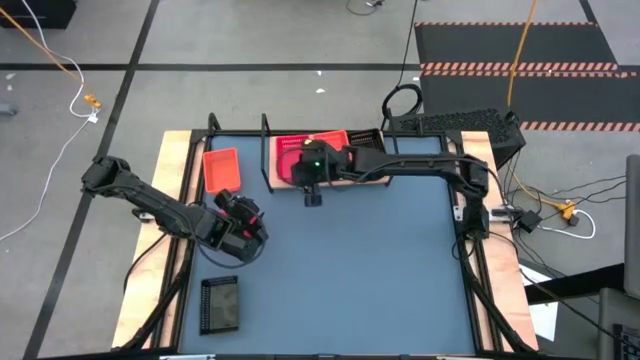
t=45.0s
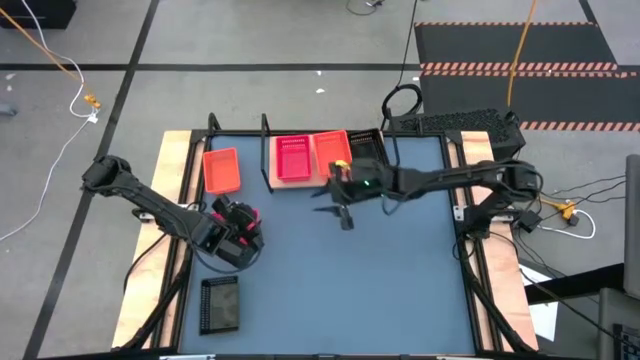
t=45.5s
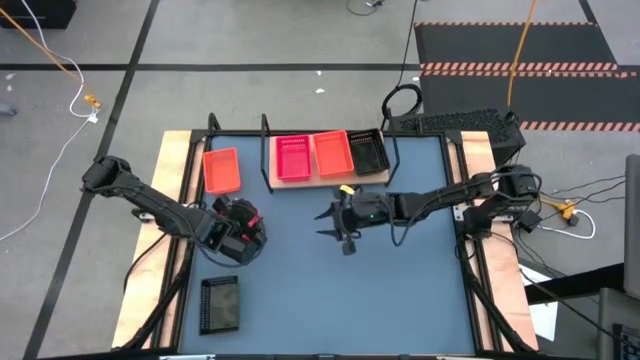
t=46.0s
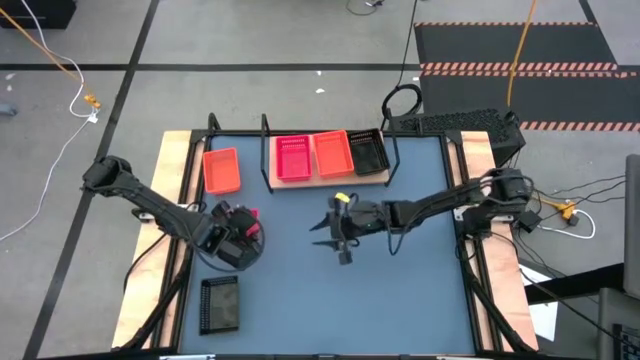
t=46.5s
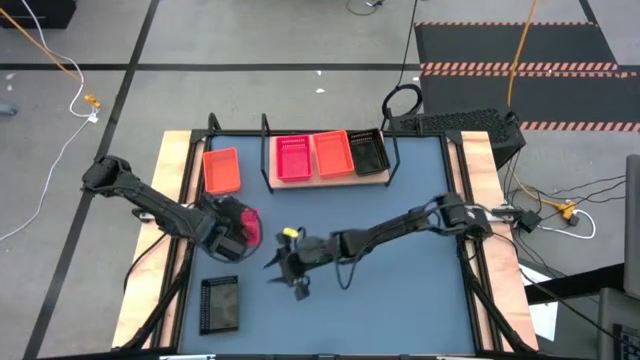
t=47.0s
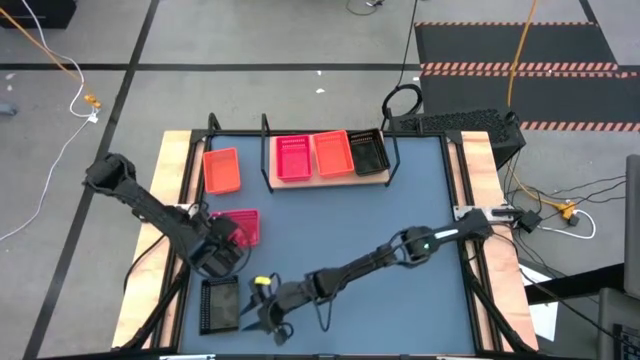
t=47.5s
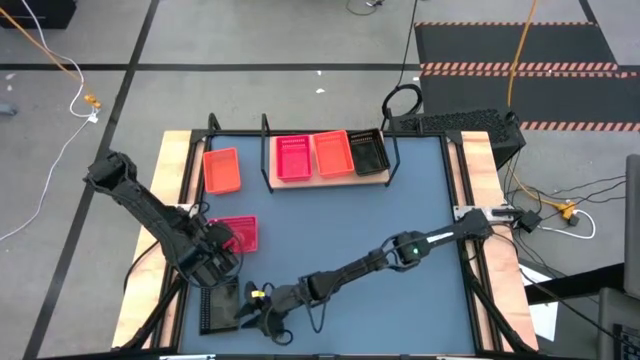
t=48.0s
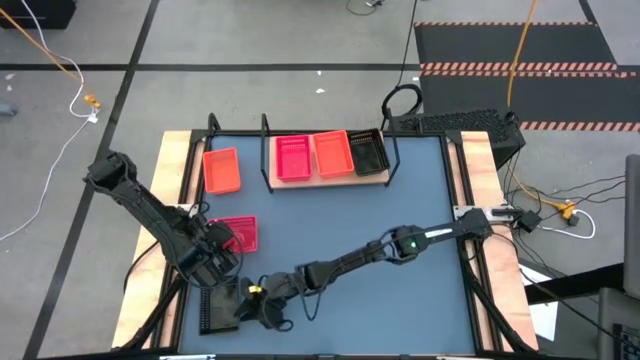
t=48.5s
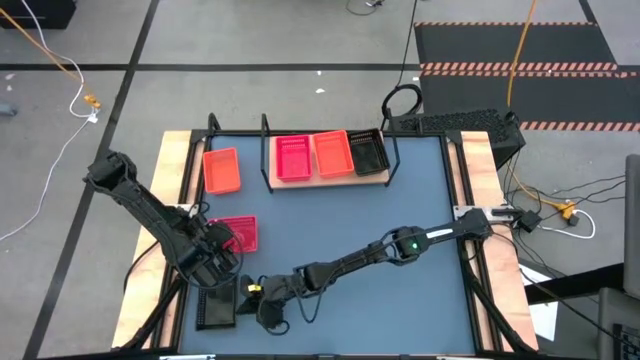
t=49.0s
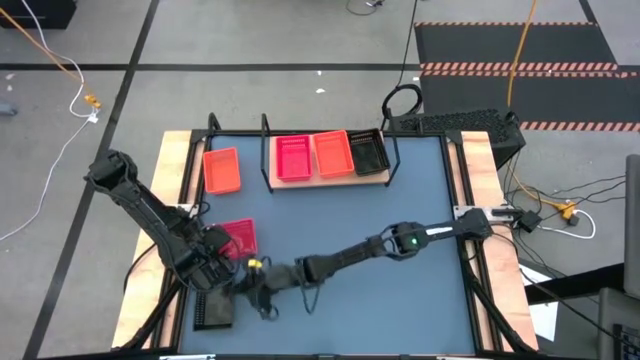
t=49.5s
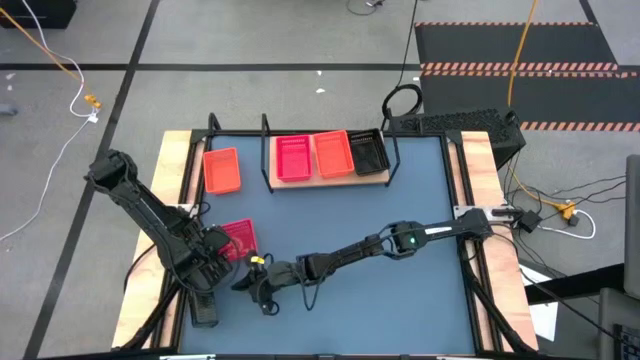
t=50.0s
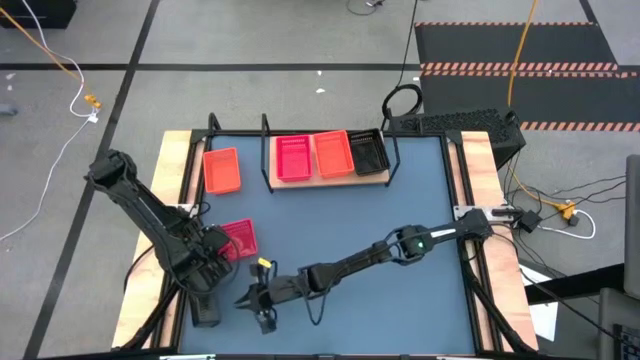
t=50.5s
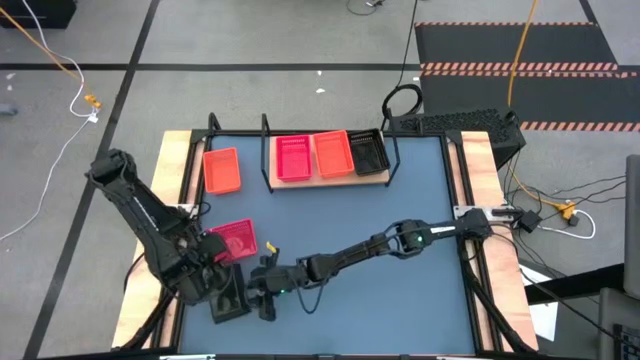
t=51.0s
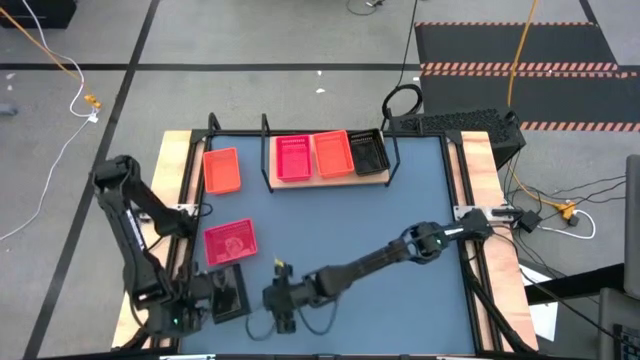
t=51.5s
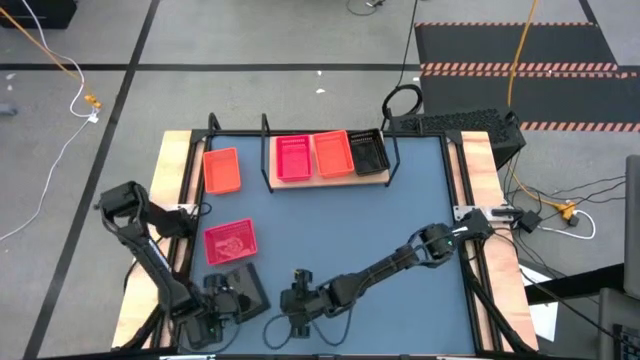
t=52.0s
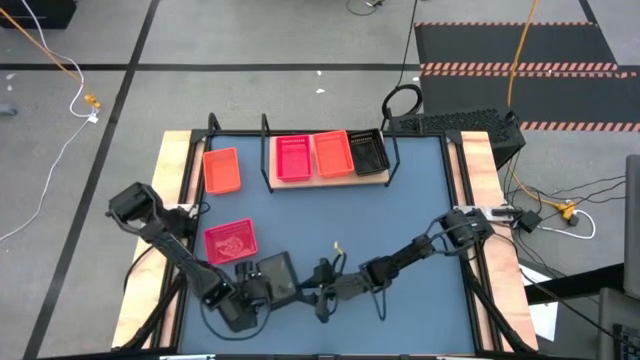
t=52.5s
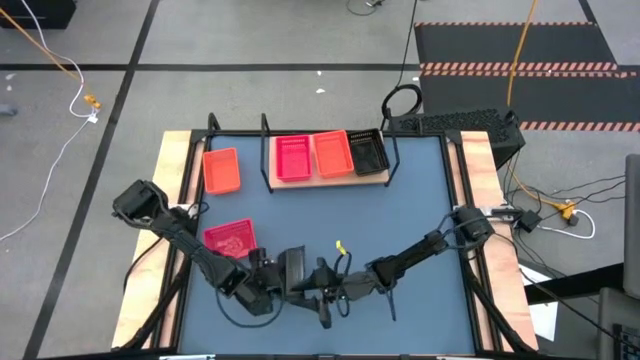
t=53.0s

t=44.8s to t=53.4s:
Task: Stack baskets on shelf by color
Stack the black basket on top of the black basket on the shelf

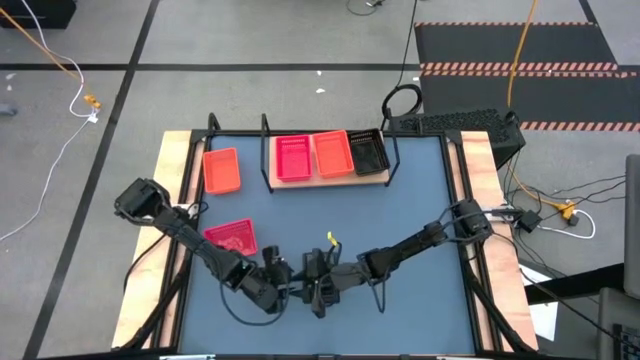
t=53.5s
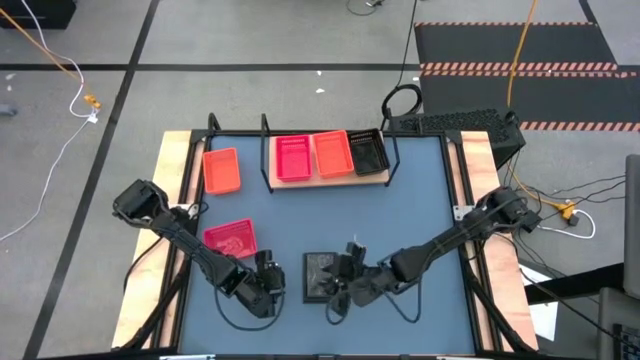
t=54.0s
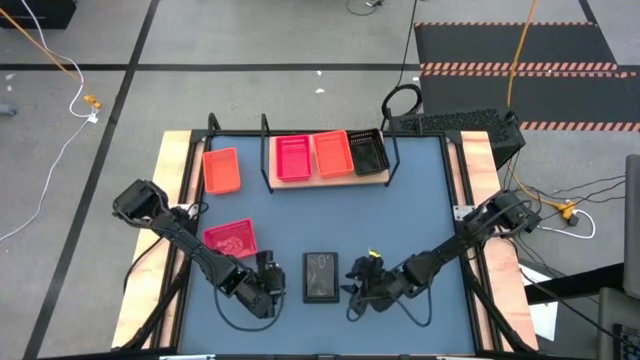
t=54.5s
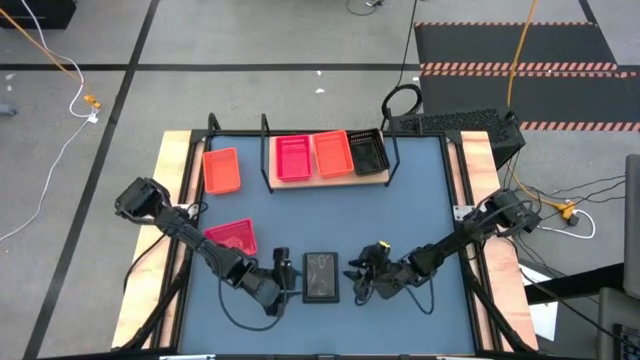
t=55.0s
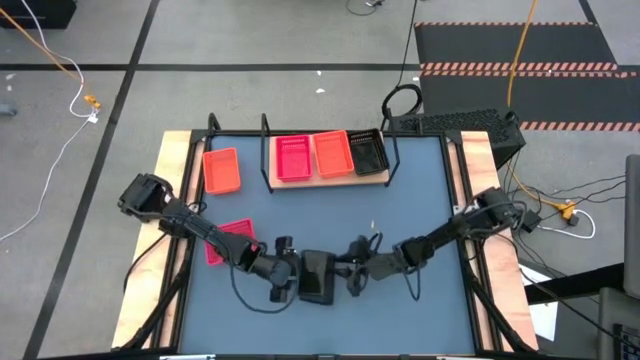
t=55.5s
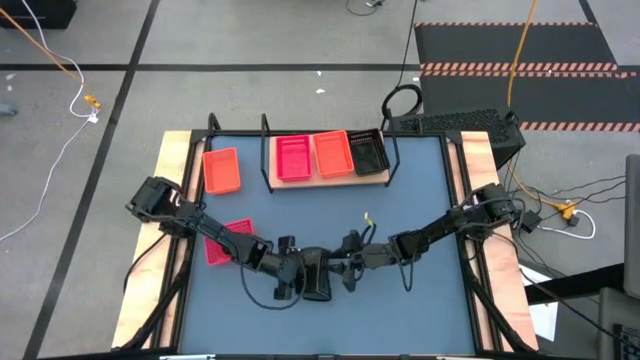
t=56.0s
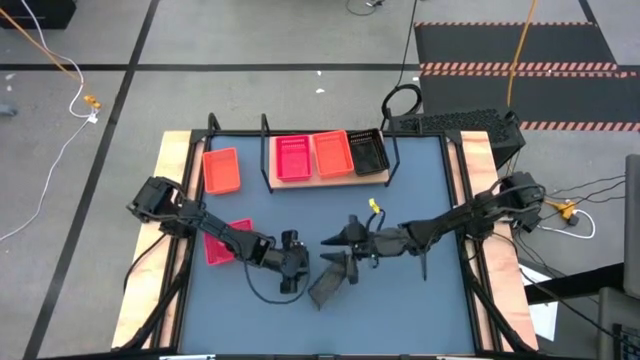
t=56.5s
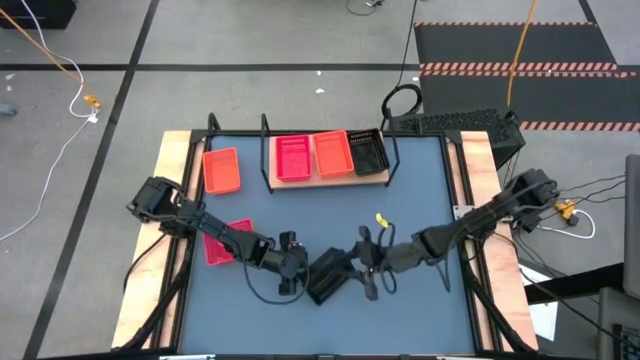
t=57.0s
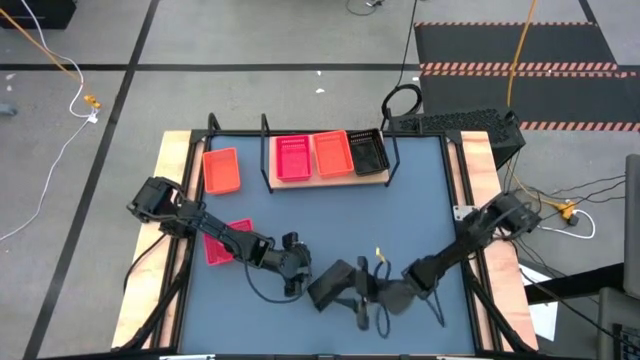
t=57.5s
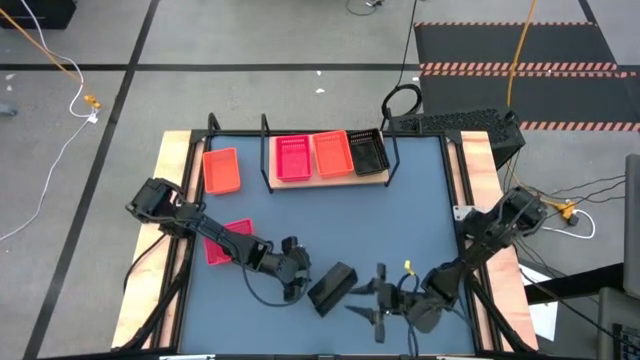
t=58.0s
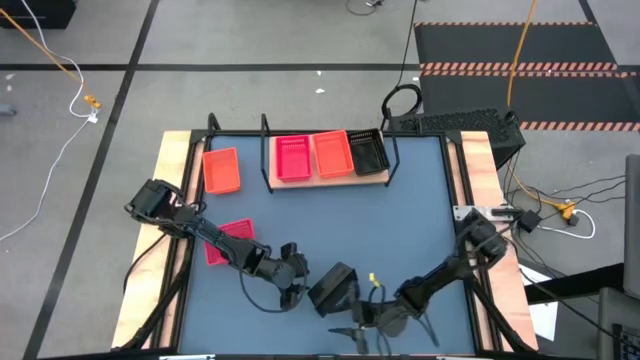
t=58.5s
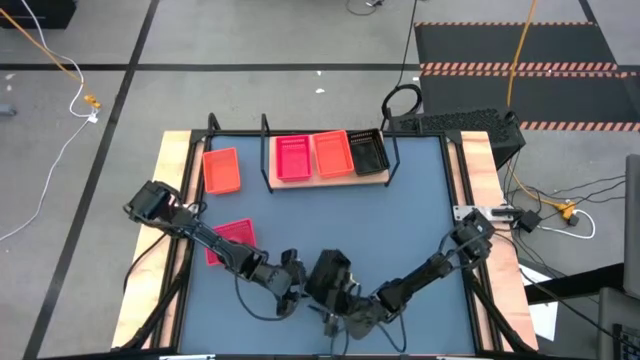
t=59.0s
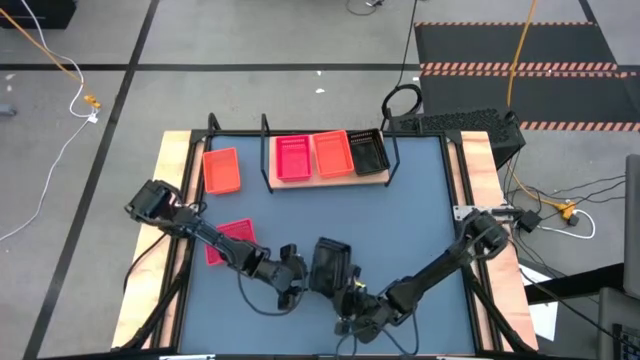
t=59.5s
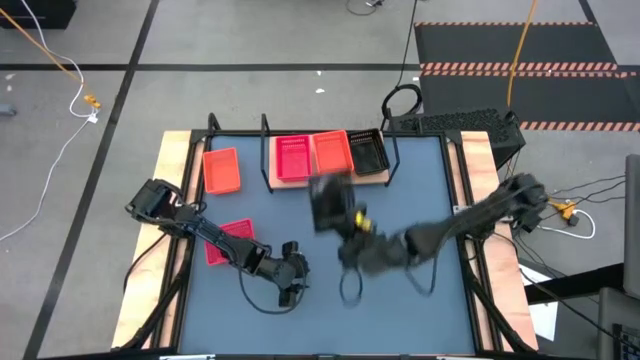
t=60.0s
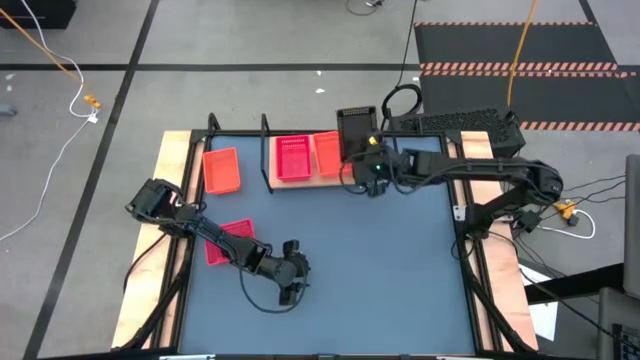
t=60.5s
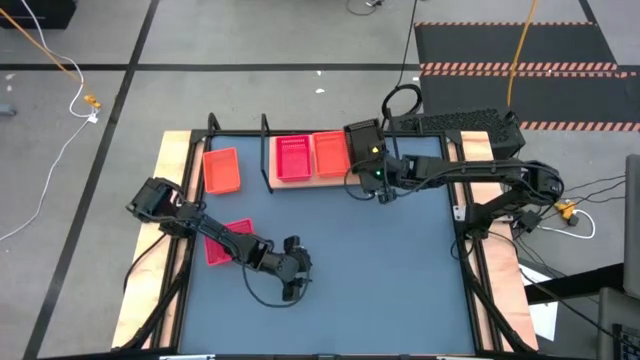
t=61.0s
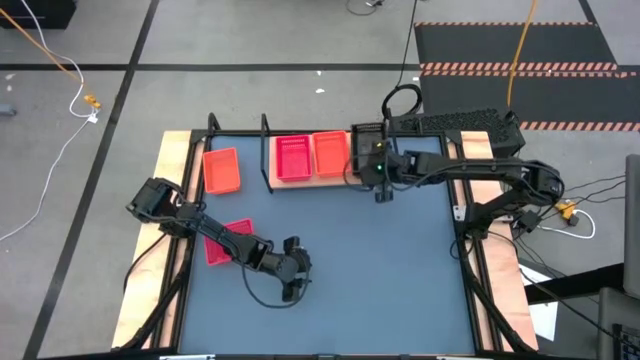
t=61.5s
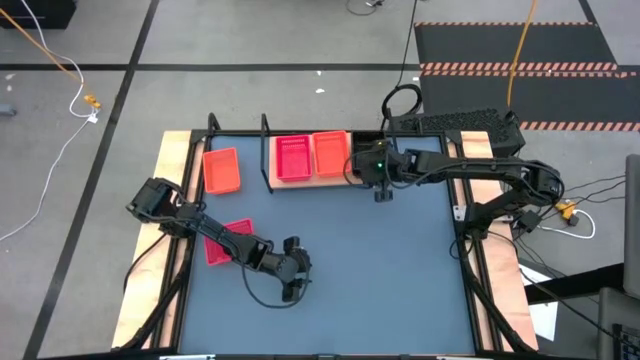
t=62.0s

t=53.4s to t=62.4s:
Stack the black basket on top of the black basket on the shelf

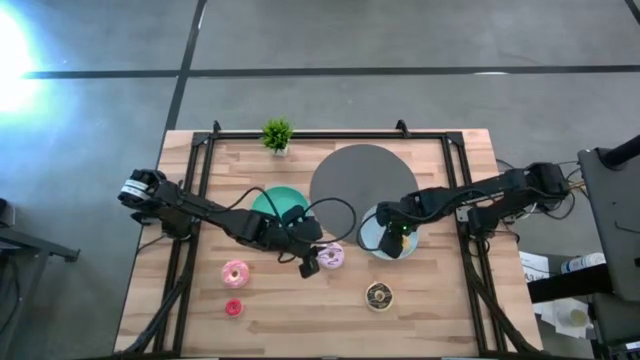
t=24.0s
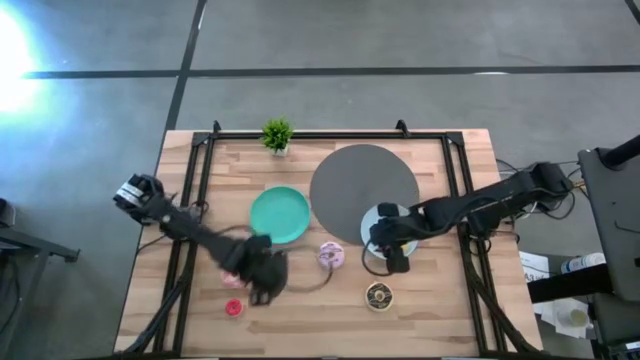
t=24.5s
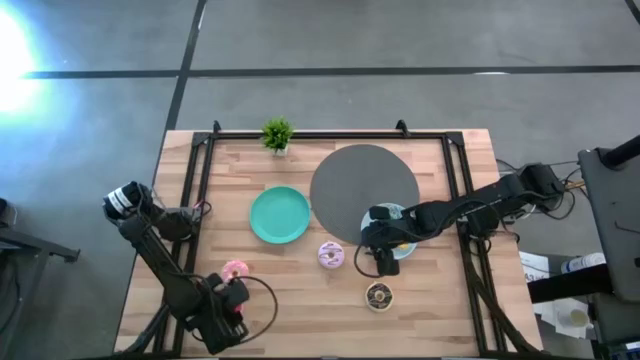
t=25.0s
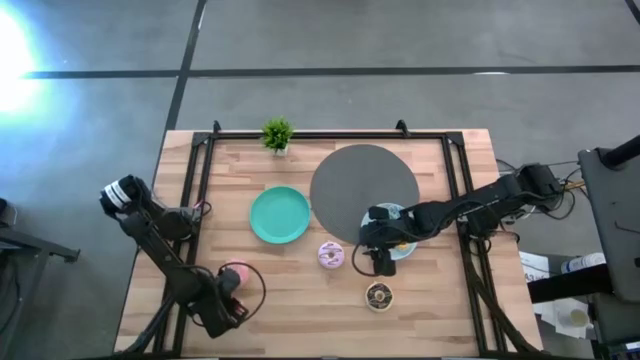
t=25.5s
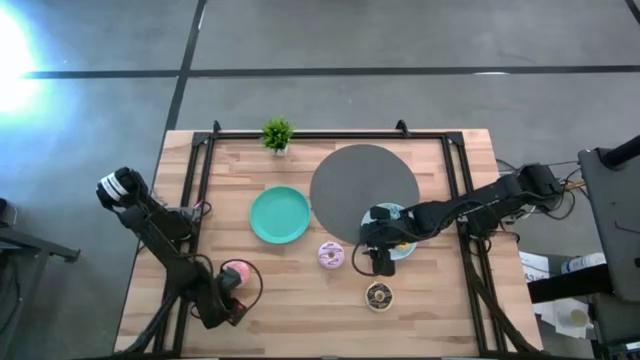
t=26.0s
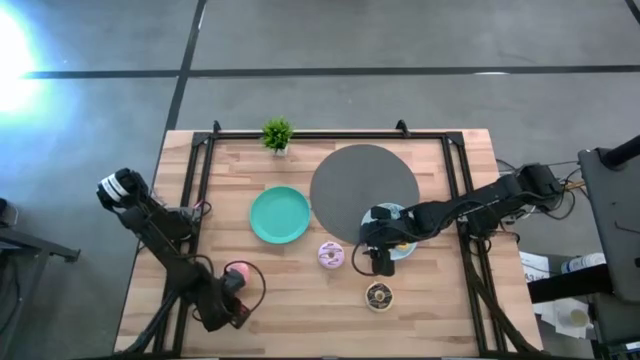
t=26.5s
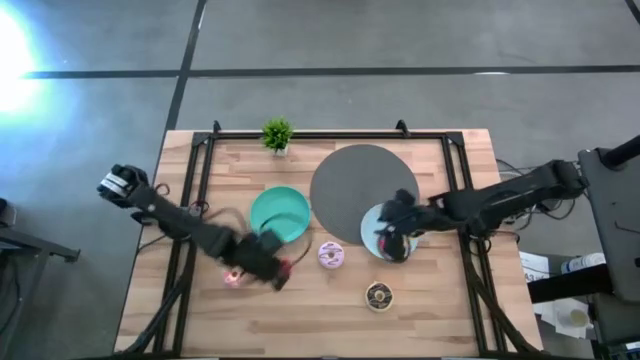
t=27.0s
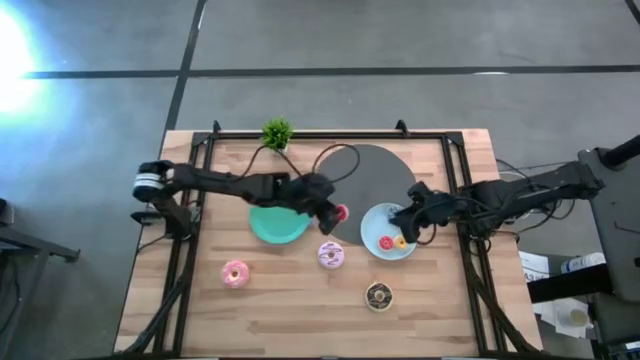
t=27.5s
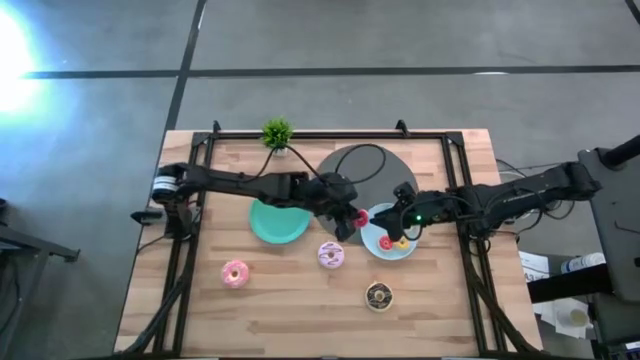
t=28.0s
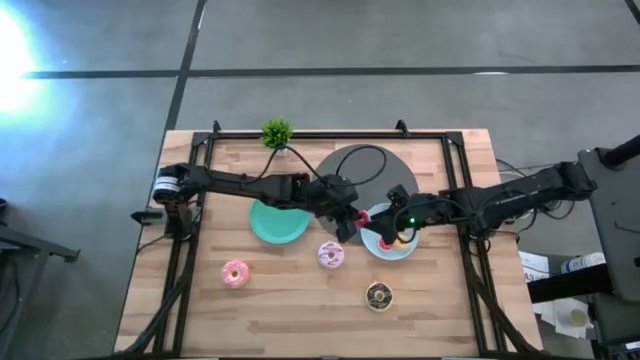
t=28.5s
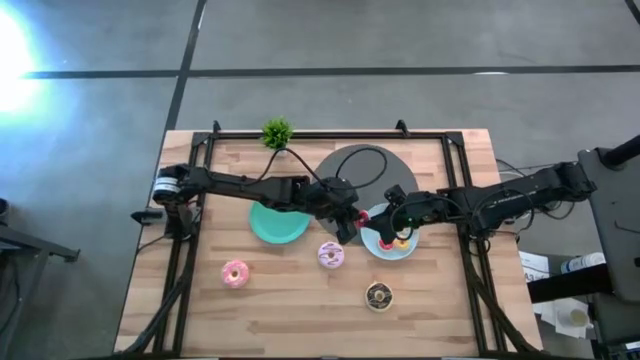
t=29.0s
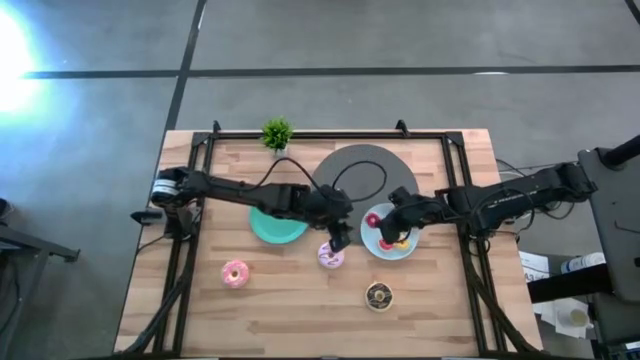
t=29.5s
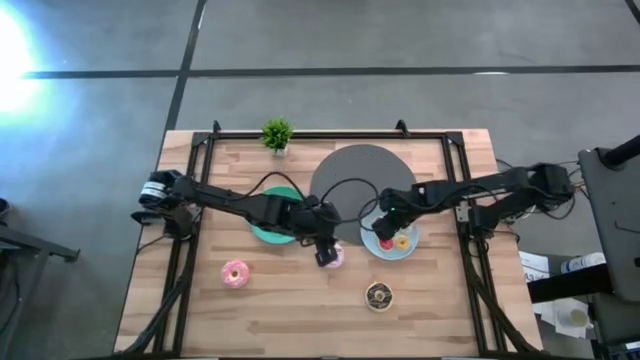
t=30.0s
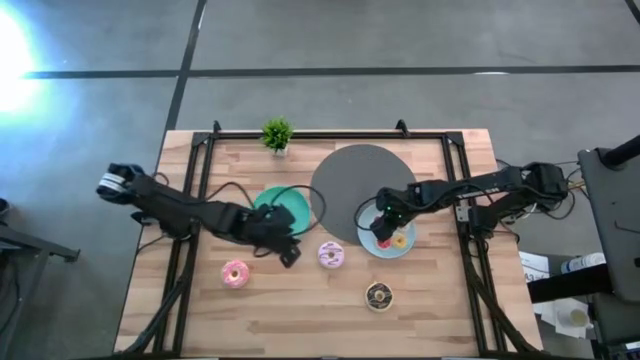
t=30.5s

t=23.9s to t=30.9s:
Task: Pick & Place donuts
Put the small red donut on the blue plate
